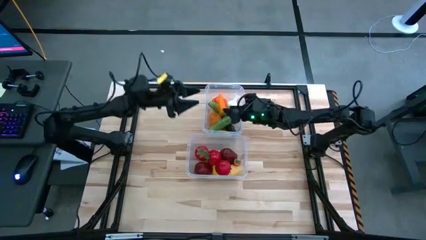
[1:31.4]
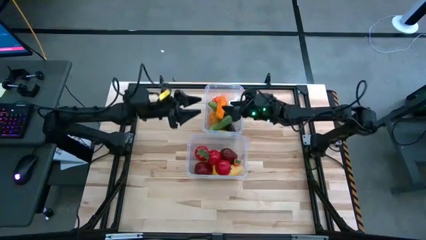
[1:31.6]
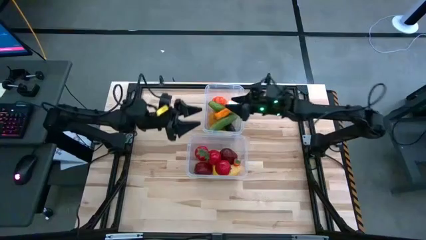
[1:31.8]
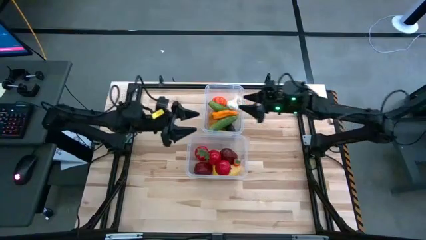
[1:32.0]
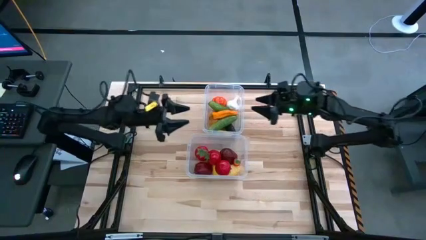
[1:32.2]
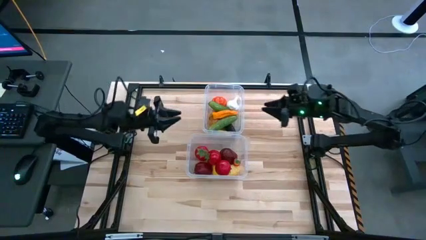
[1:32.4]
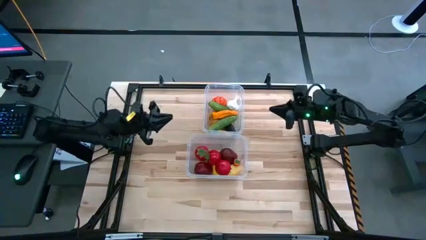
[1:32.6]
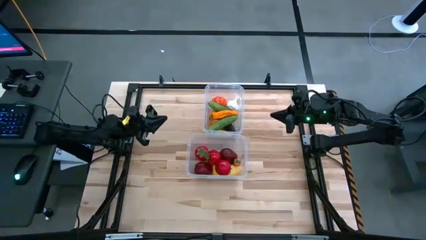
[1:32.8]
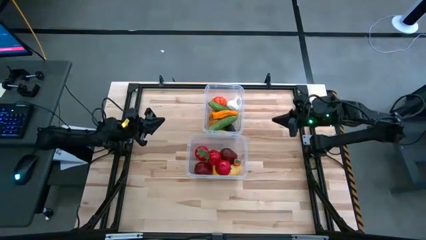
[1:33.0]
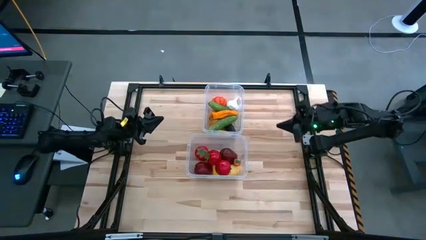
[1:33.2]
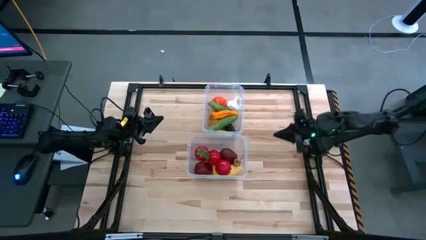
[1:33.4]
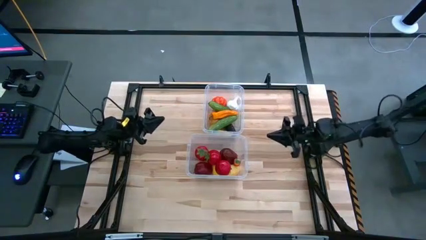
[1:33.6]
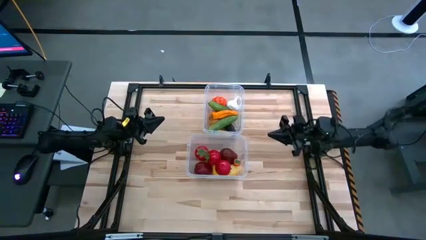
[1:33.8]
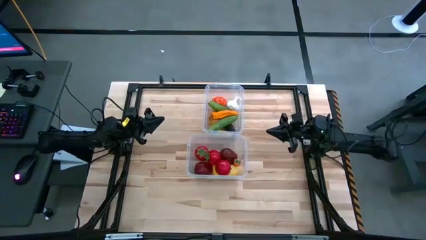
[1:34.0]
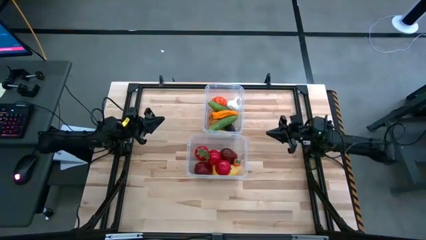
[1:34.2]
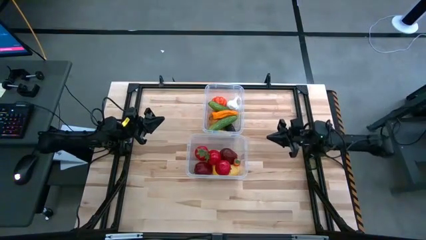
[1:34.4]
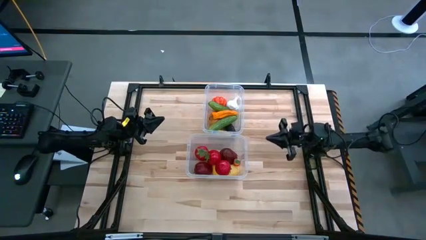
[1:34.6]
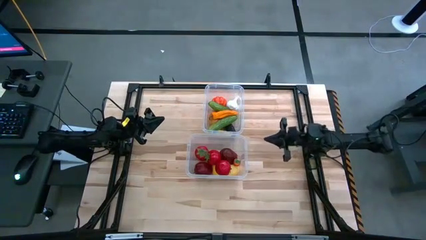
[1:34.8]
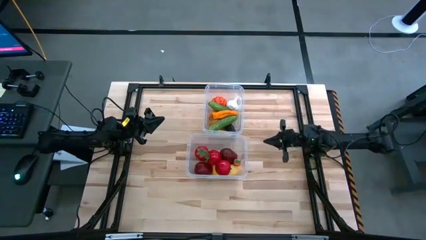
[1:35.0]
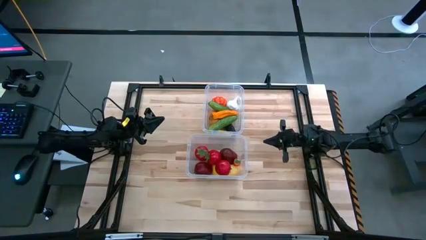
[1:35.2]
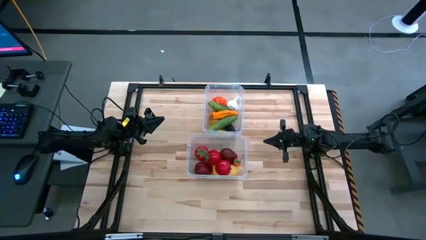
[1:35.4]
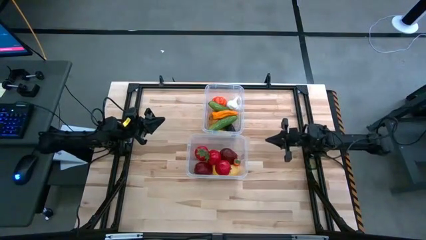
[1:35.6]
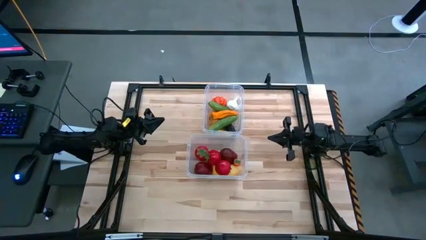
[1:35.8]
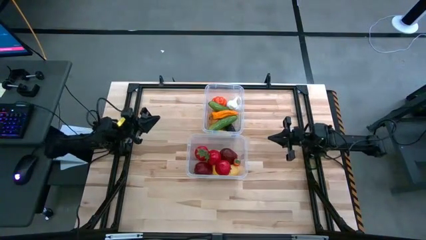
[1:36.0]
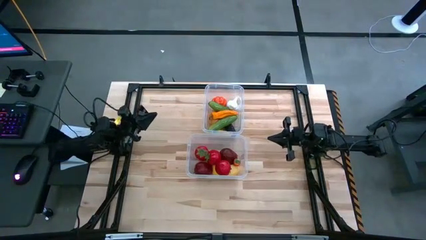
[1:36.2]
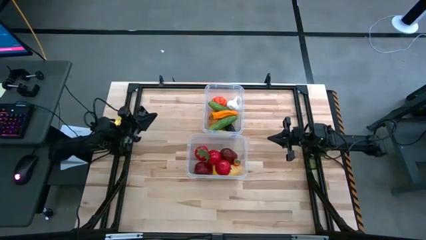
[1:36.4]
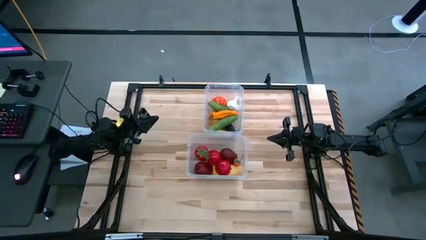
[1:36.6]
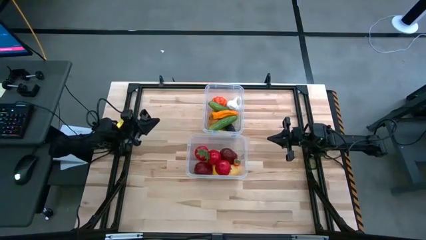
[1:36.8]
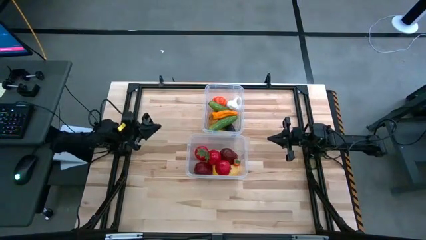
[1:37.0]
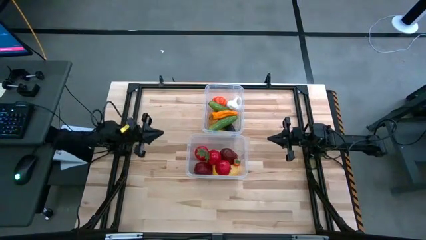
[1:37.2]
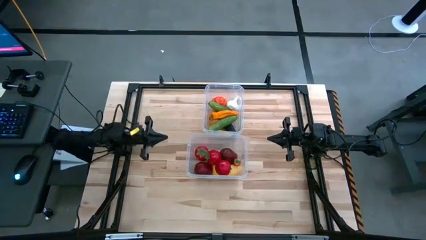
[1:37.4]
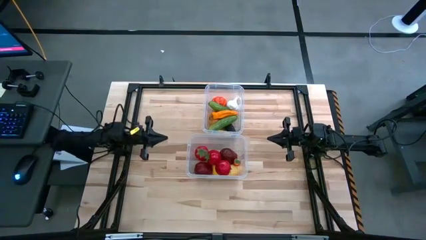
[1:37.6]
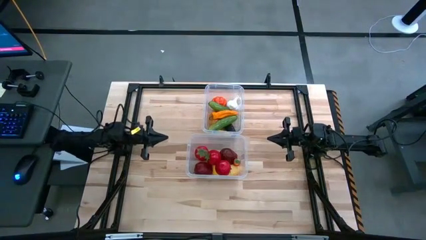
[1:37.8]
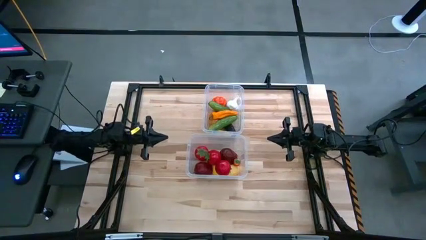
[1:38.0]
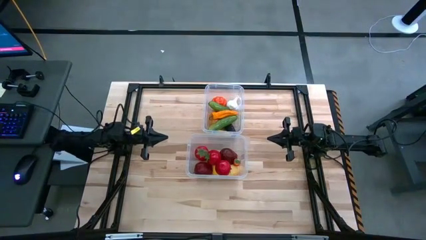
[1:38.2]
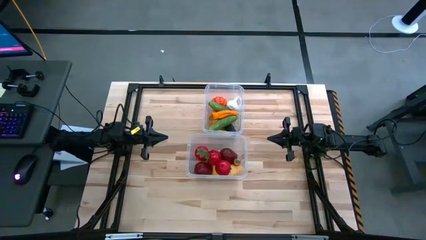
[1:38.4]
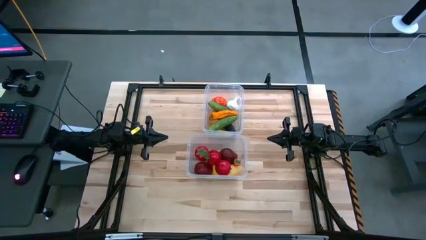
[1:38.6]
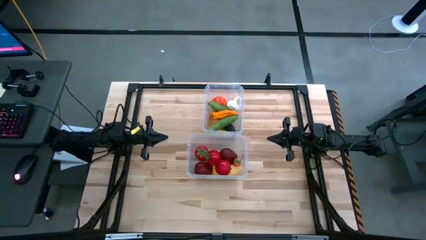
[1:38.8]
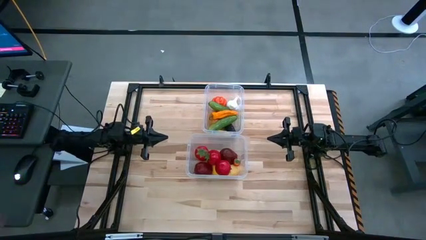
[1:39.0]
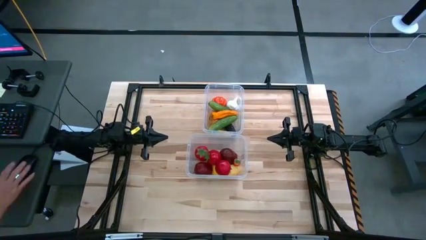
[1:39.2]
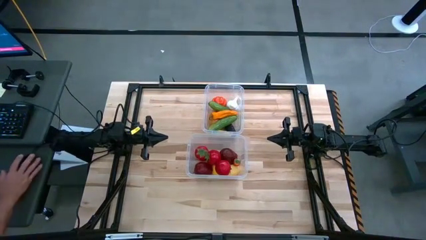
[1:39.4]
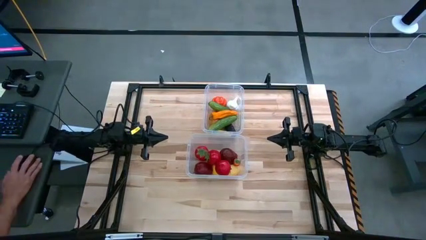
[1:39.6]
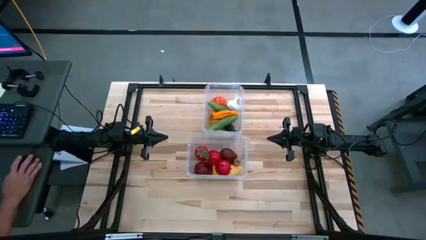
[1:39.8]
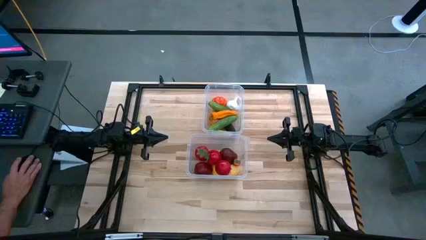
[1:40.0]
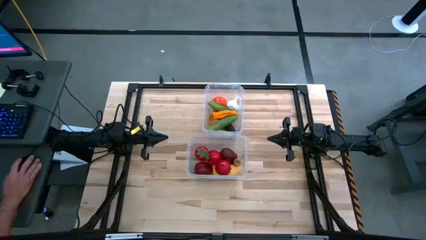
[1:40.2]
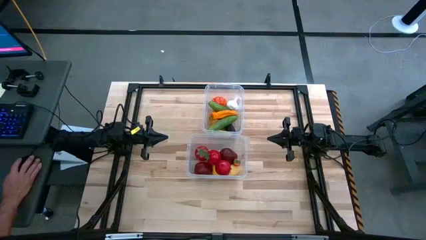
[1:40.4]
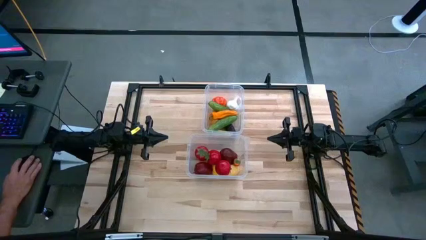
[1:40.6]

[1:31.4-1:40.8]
Task: Sort produce into baskets
Return to Home Position

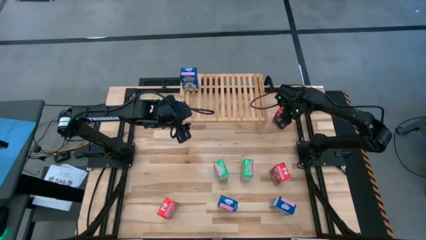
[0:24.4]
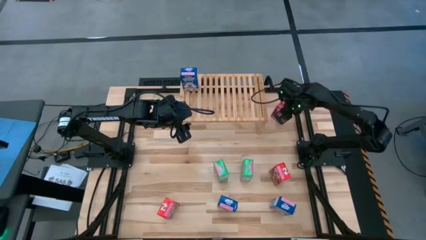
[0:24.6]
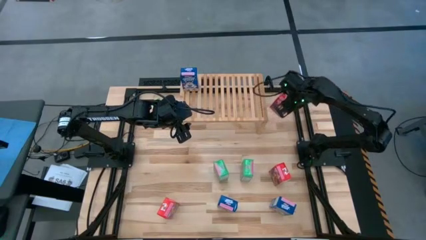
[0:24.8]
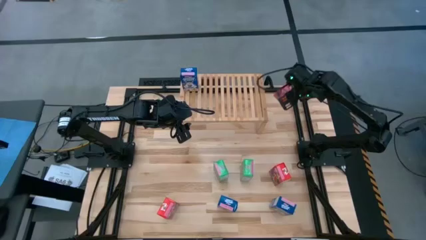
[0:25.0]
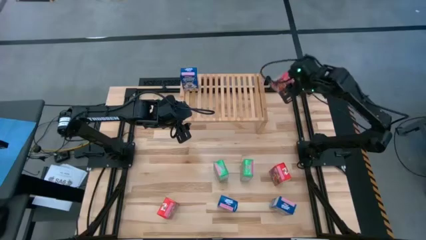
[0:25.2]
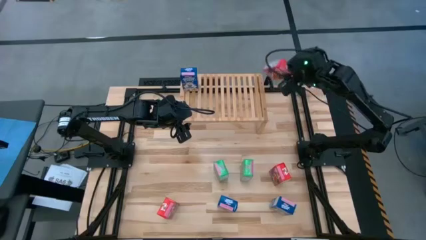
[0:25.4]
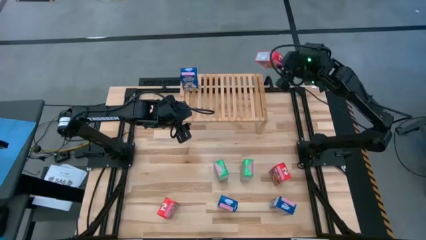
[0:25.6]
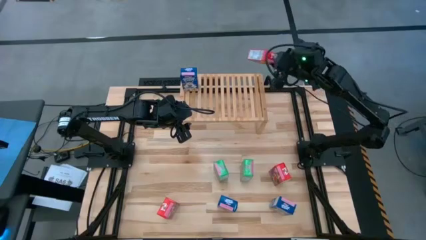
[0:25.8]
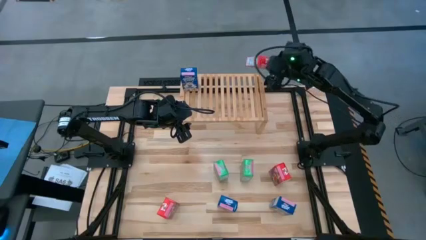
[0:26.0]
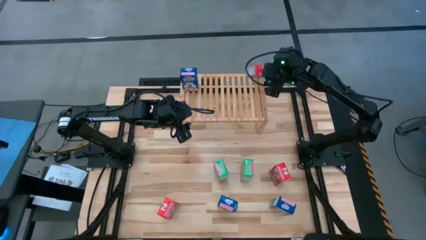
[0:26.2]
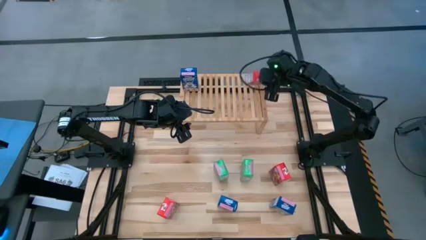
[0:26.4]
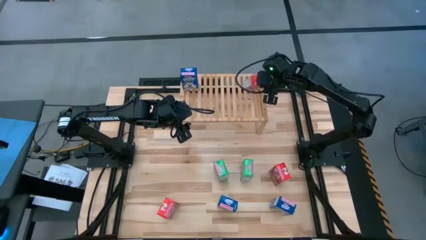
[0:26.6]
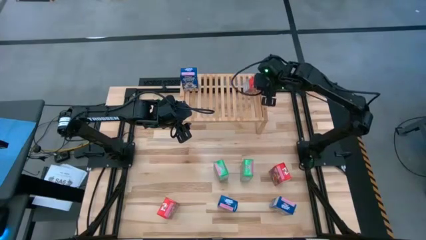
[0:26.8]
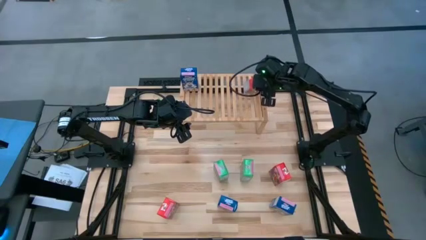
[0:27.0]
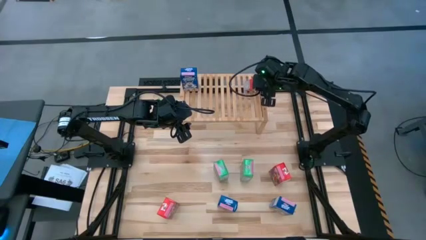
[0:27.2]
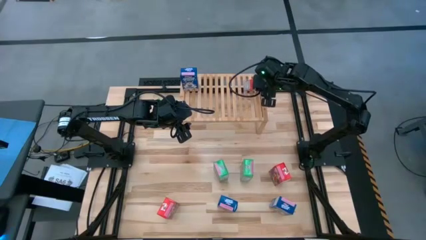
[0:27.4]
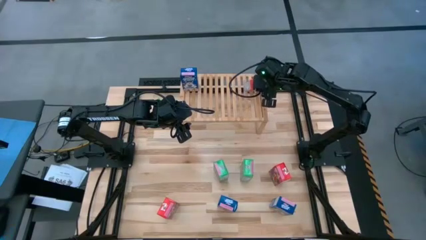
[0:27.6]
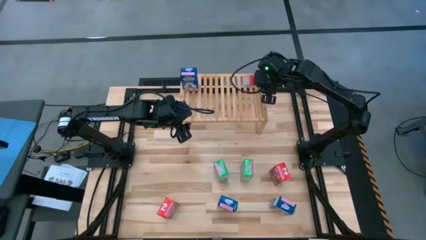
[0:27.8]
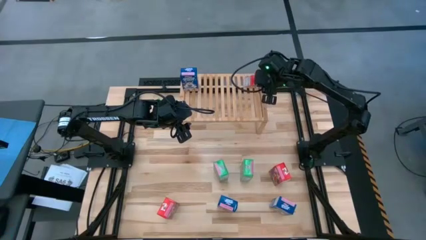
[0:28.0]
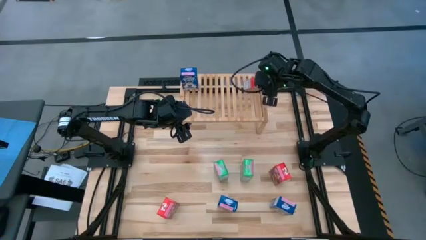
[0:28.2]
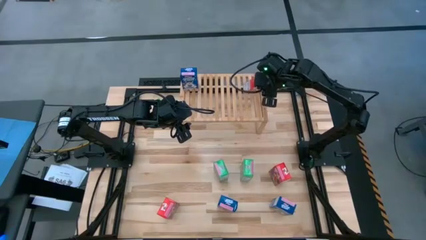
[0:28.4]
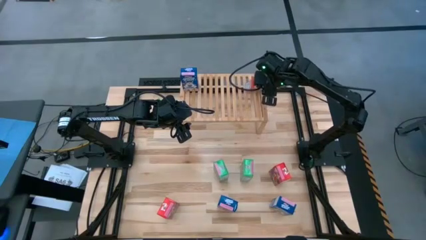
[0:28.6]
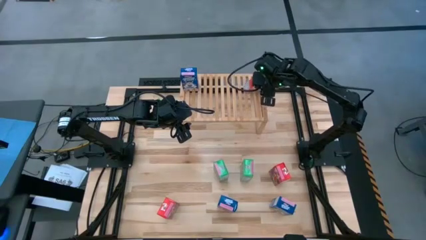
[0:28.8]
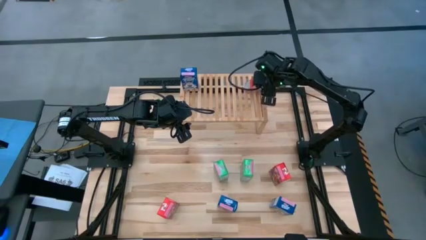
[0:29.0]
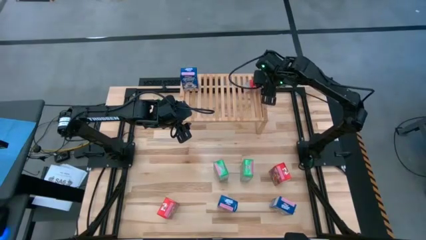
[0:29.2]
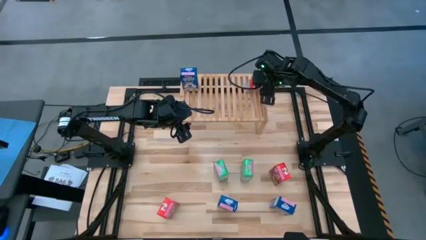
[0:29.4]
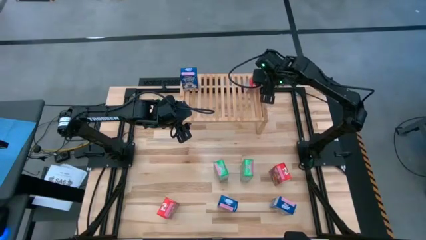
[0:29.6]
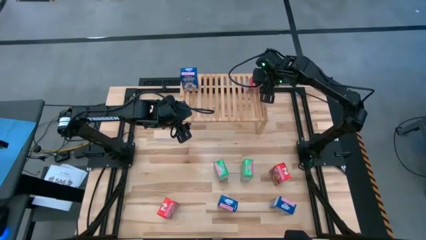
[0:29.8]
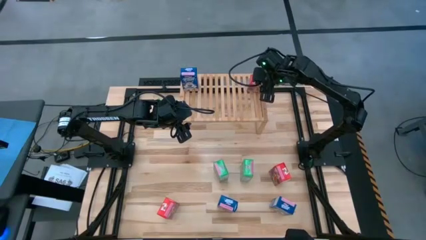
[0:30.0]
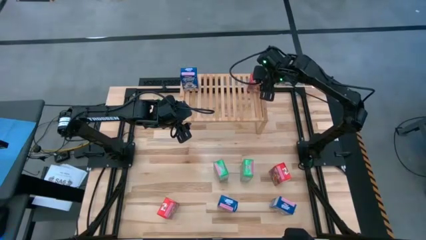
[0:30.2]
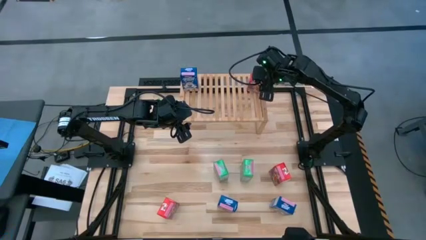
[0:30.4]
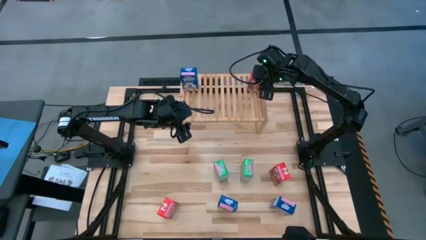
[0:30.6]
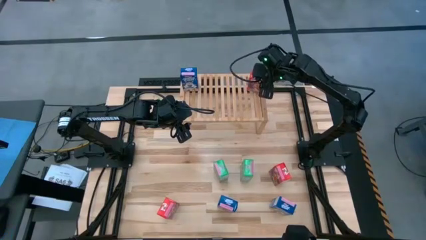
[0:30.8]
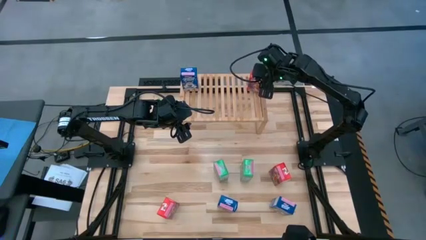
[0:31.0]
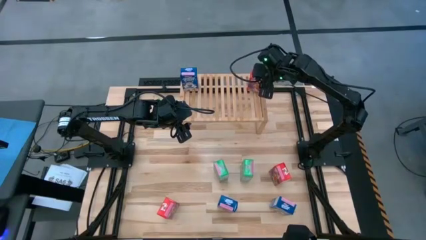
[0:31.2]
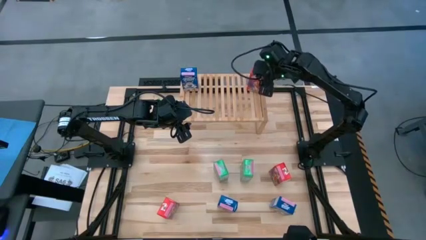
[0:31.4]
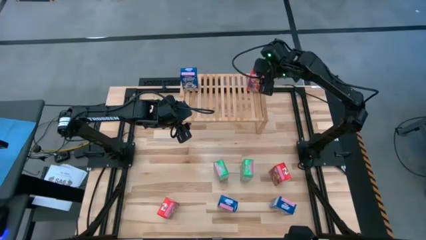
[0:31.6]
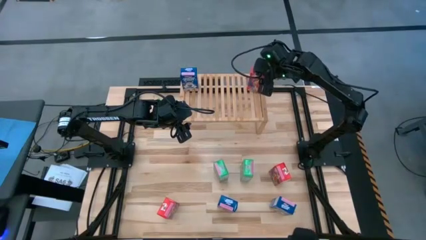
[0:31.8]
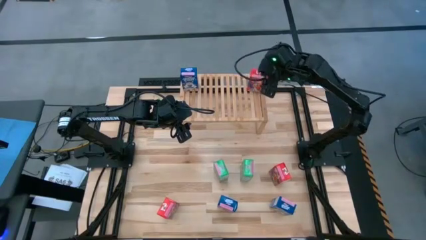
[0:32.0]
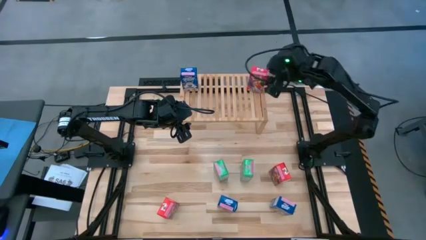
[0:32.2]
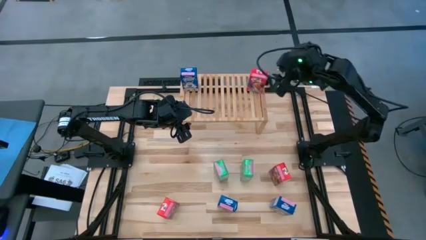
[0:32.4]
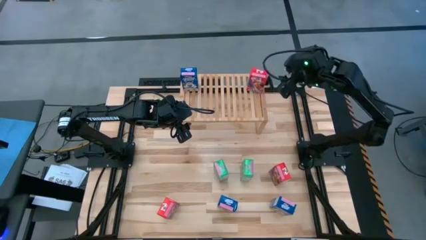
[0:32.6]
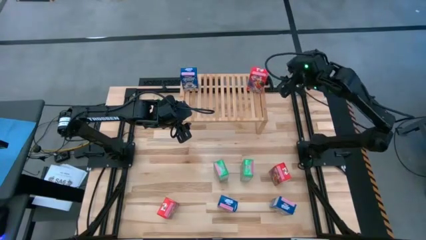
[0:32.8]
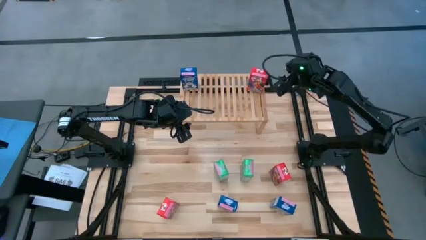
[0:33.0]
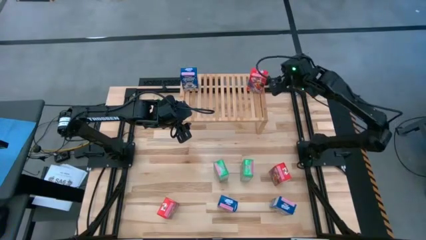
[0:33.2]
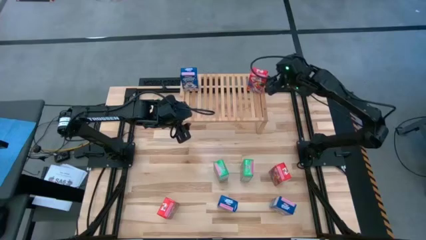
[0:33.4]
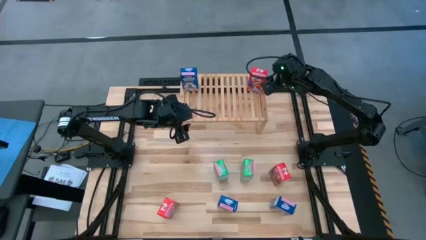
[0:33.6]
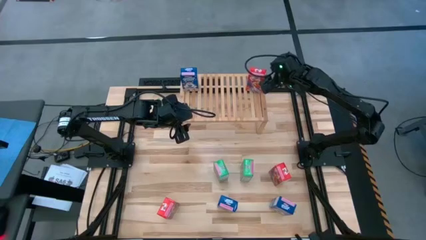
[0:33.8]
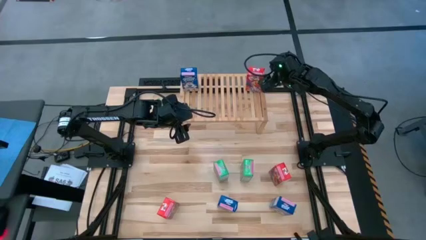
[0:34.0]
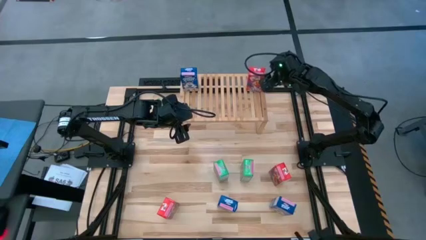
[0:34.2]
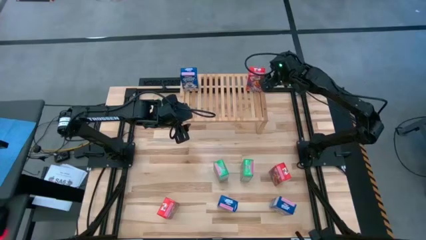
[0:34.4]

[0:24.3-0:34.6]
Task: Stack cereal on shelf
Put the top red cereal box on the shelf
